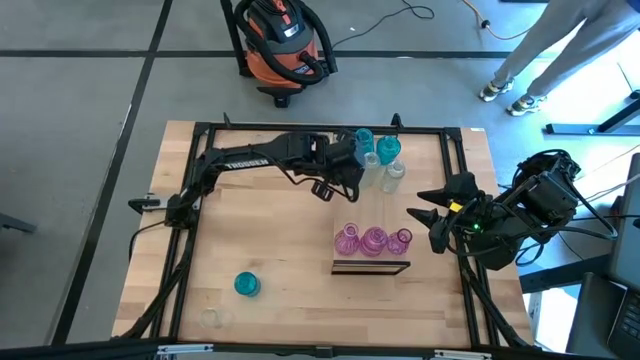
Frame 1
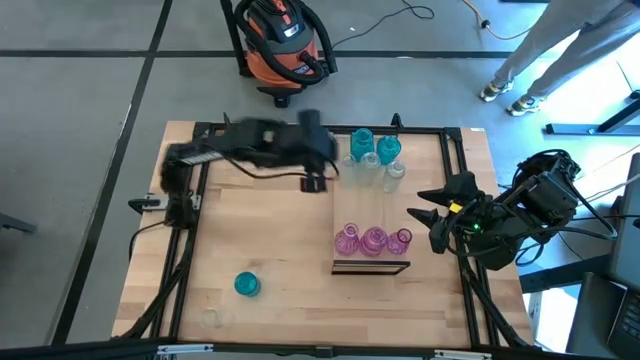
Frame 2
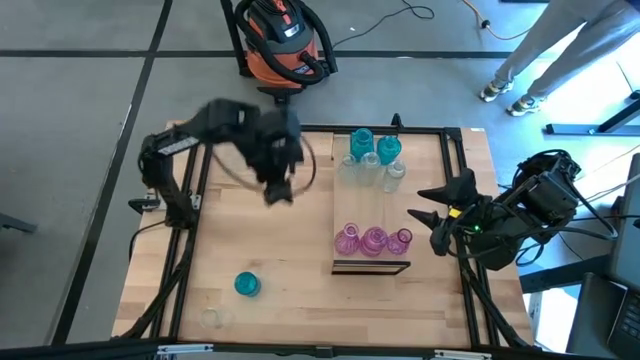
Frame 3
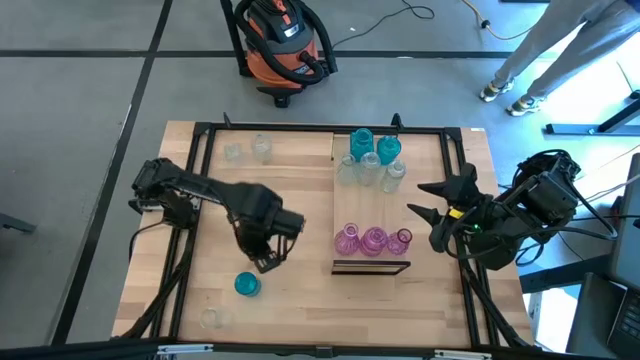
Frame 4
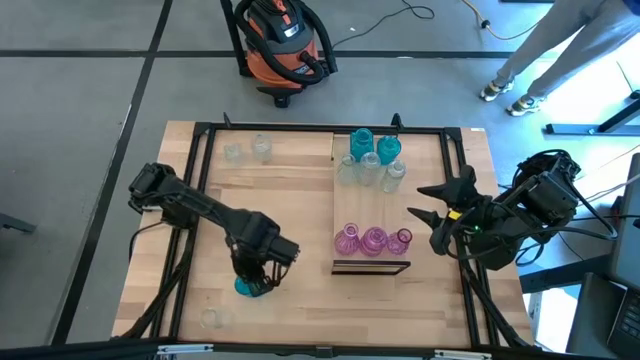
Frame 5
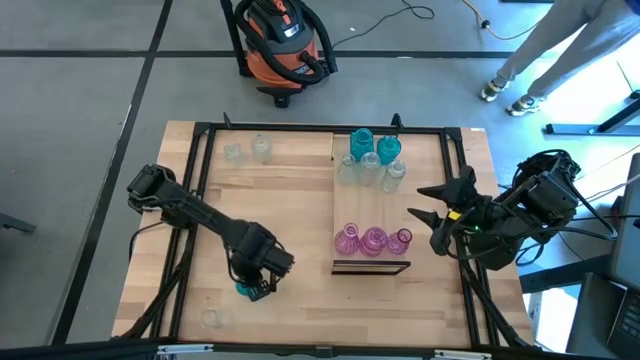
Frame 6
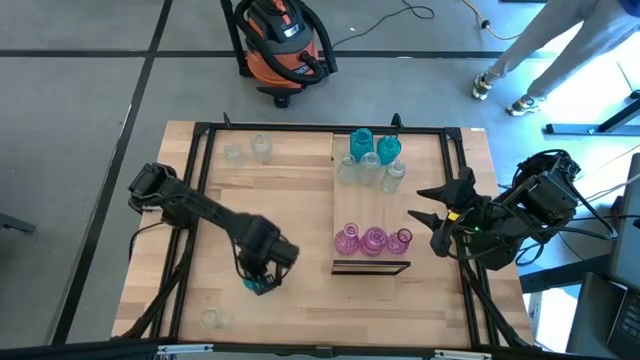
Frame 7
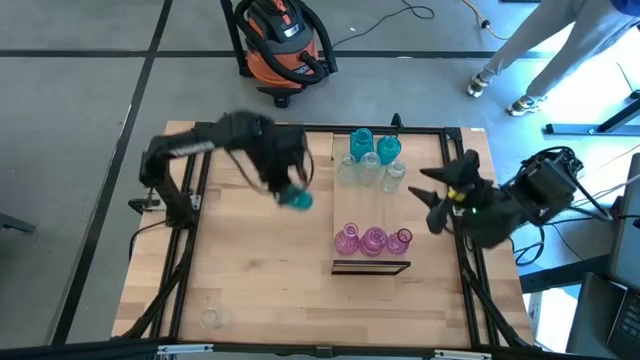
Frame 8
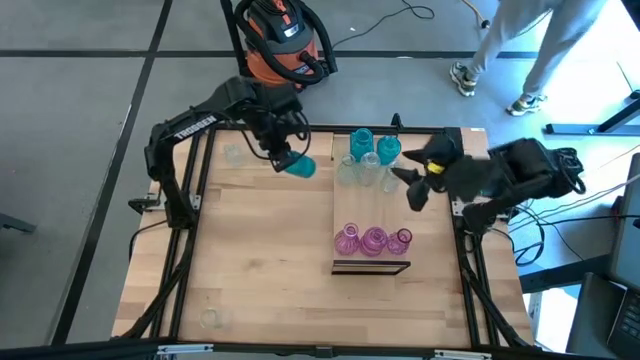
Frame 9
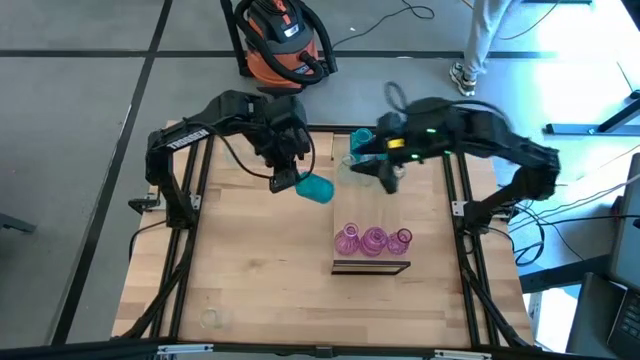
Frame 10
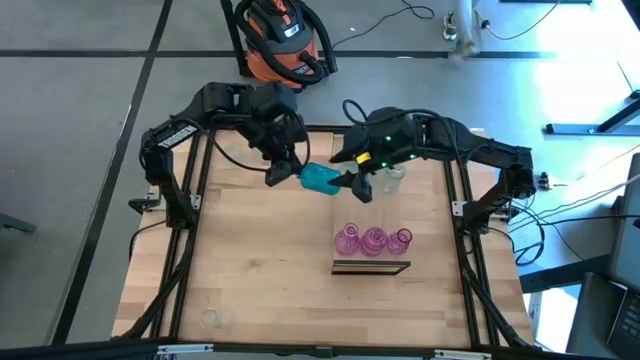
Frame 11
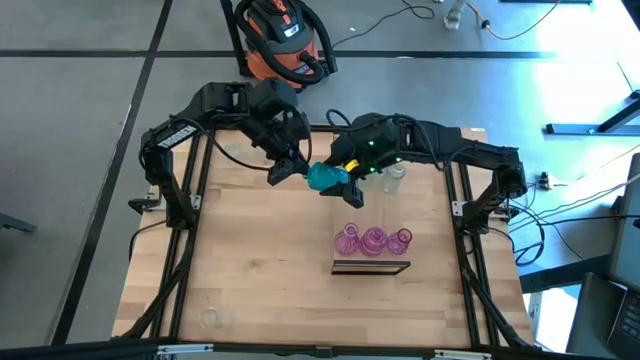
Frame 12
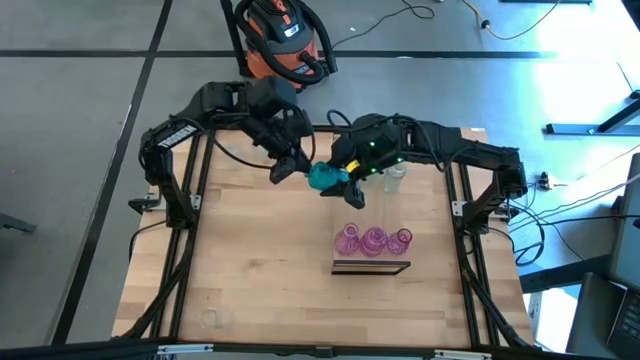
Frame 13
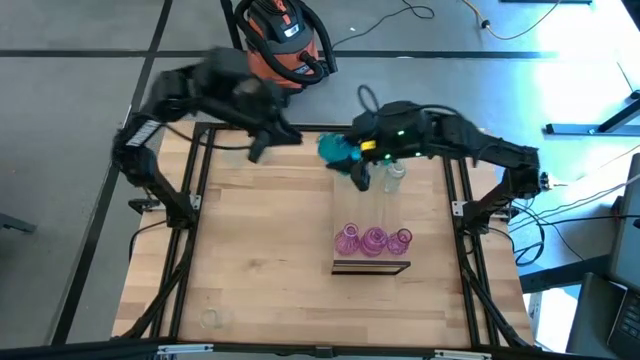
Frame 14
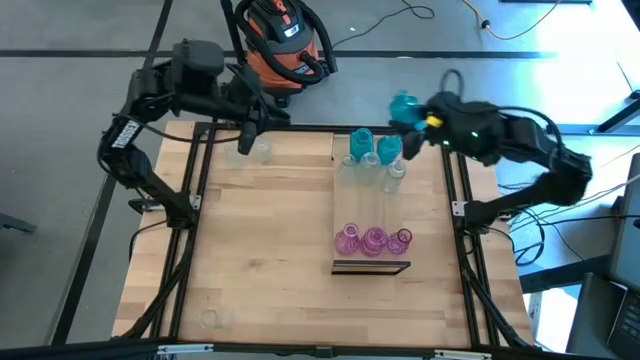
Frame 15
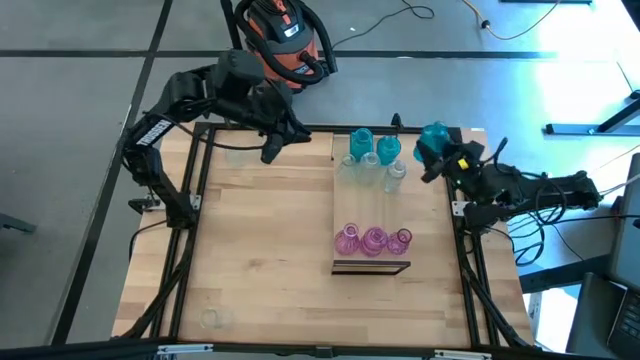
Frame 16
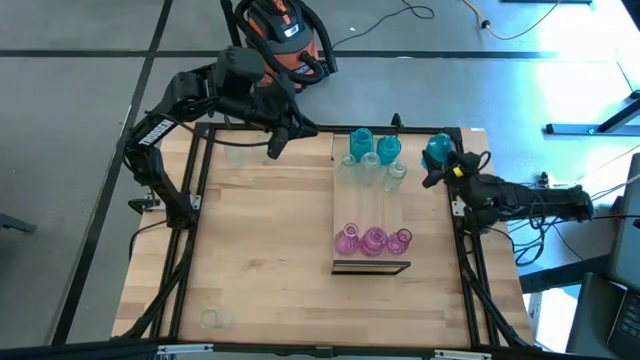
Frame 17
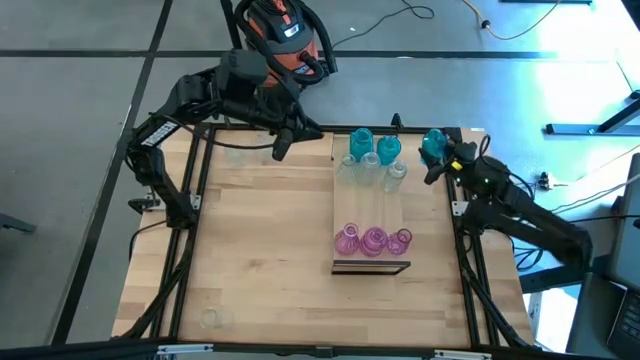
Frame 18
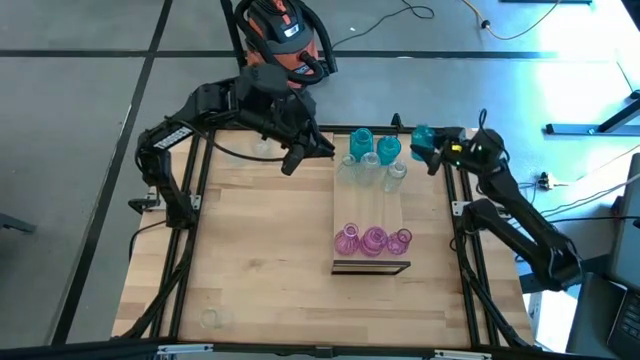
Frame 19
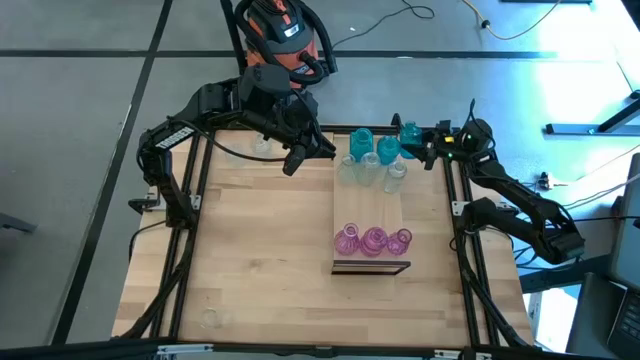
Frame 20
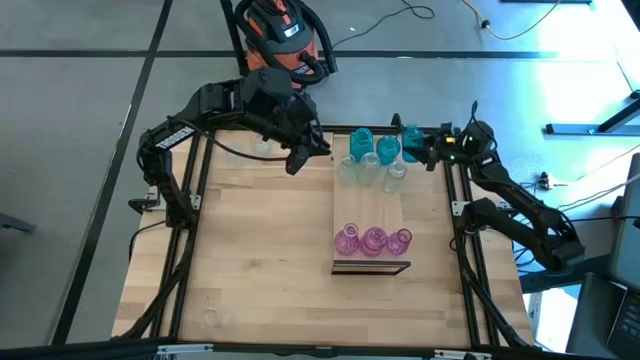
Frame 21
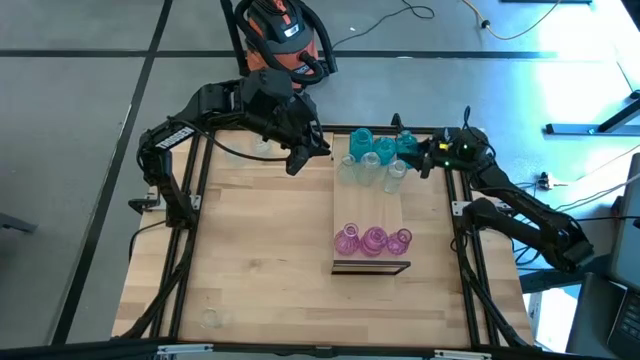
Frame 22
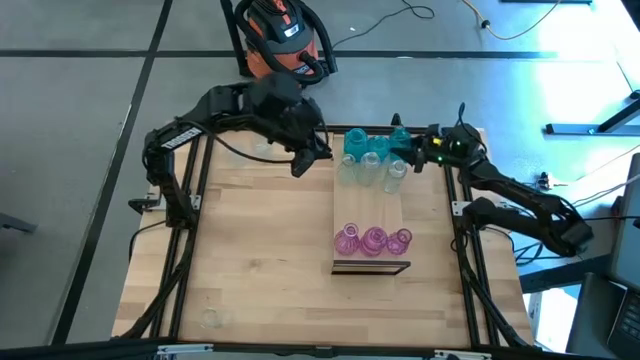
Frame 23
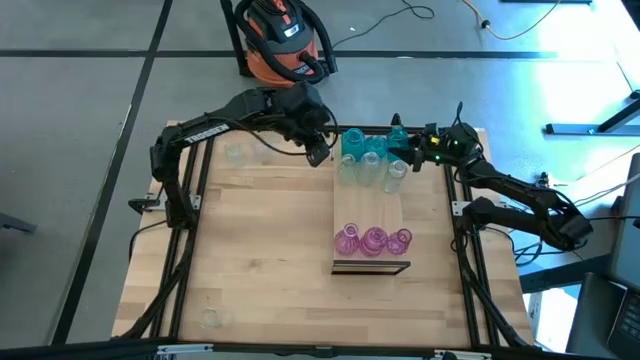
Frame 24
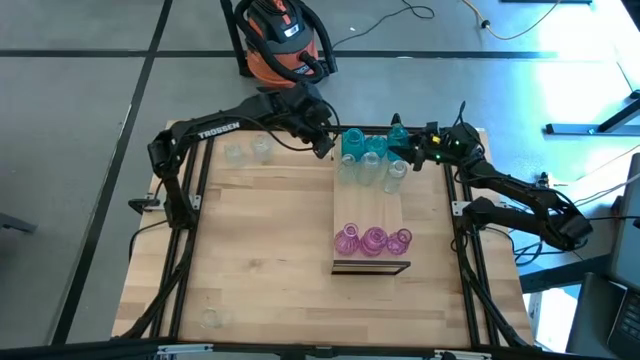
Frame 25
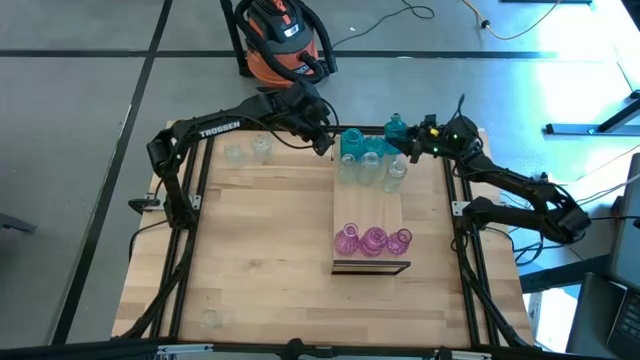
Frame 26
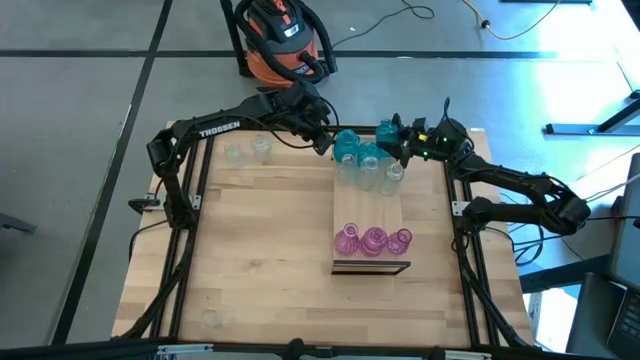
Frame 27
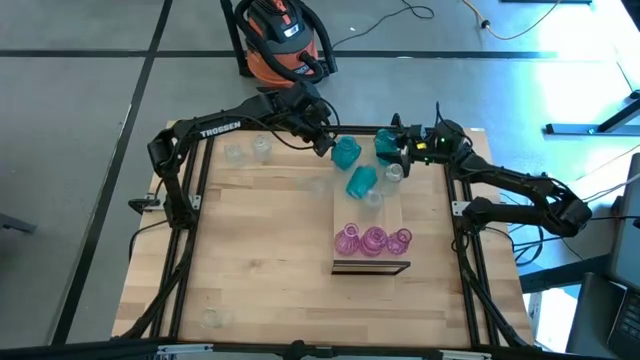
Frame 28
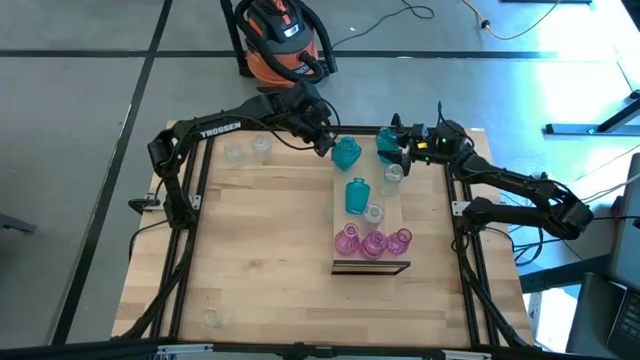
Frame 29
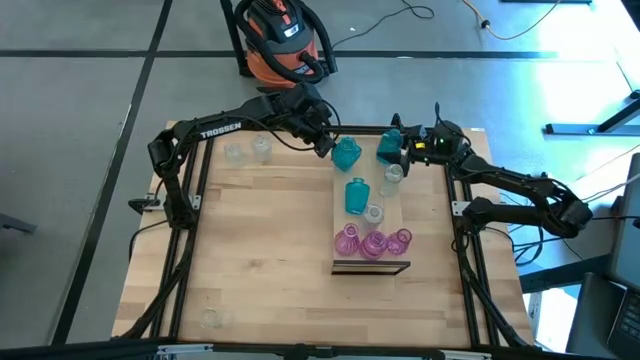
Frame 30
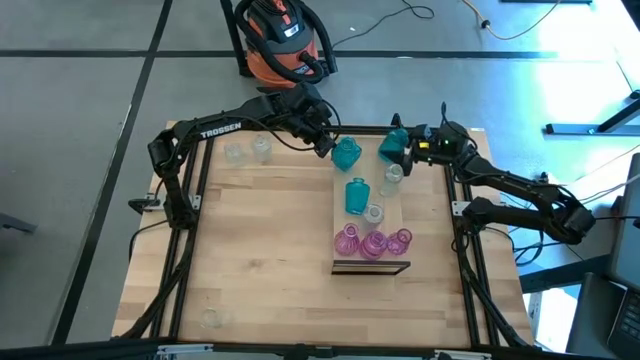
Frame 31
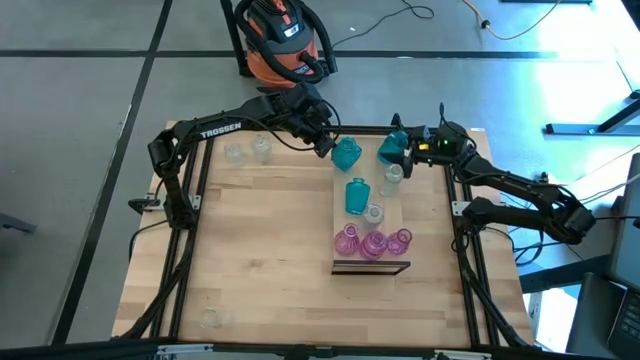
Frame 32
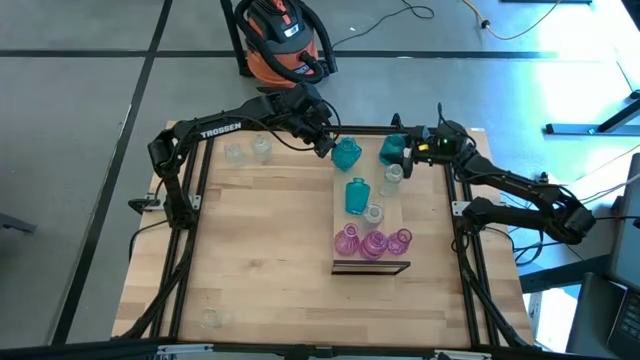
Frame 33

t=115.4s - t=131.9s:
Task: sort vases onto shelf
Put the blue vase on the shelf aligned with the other blue vase

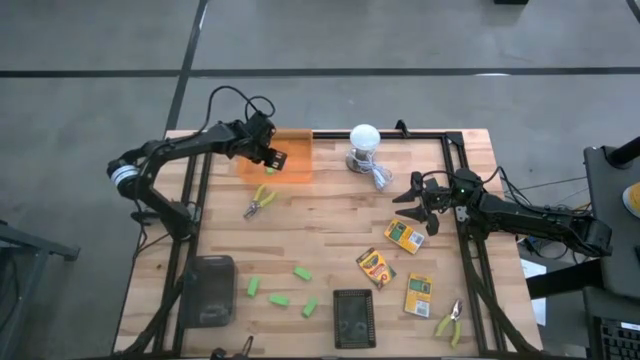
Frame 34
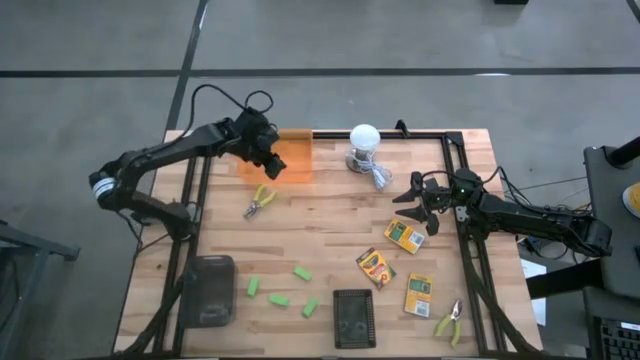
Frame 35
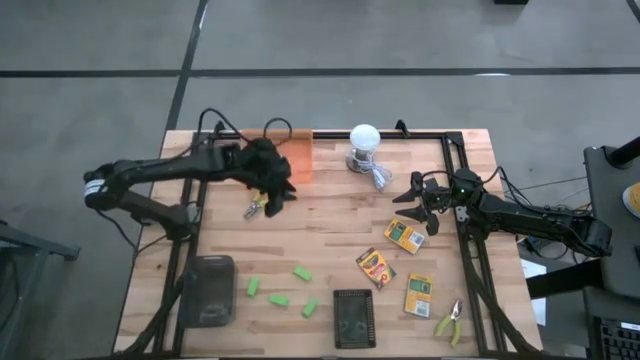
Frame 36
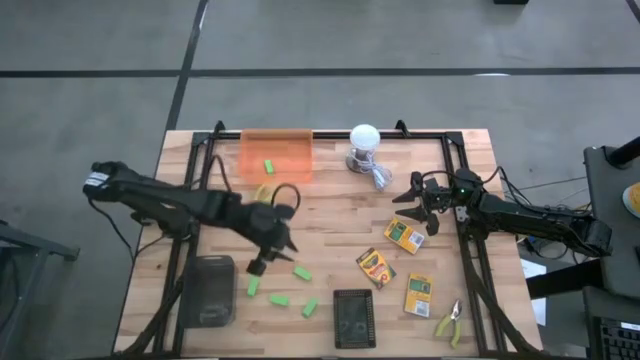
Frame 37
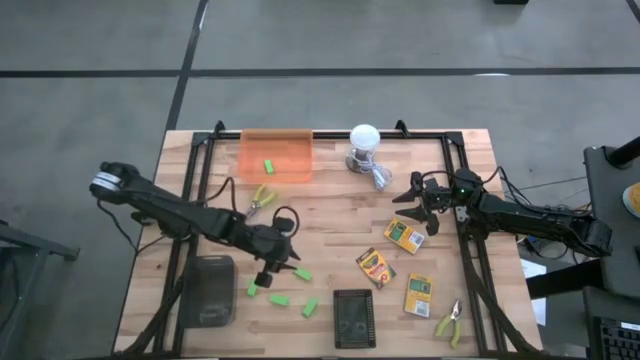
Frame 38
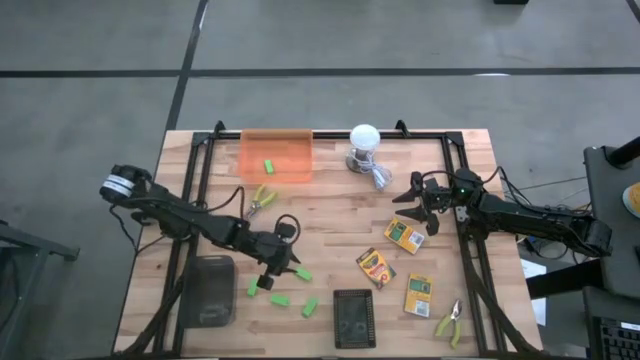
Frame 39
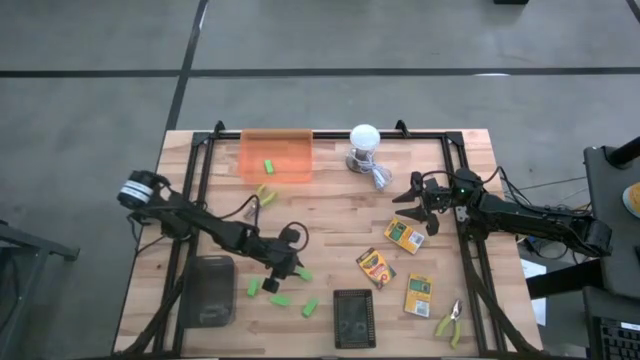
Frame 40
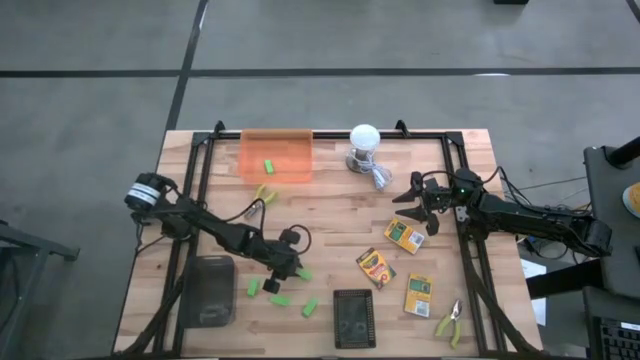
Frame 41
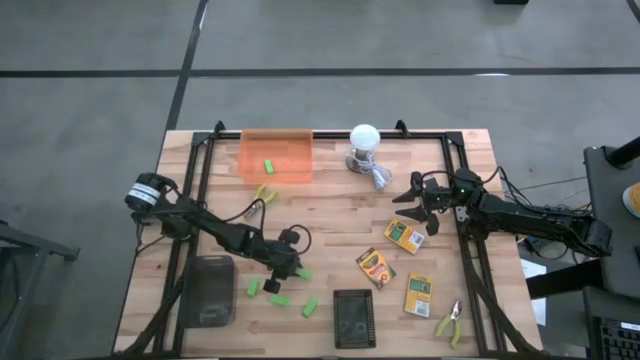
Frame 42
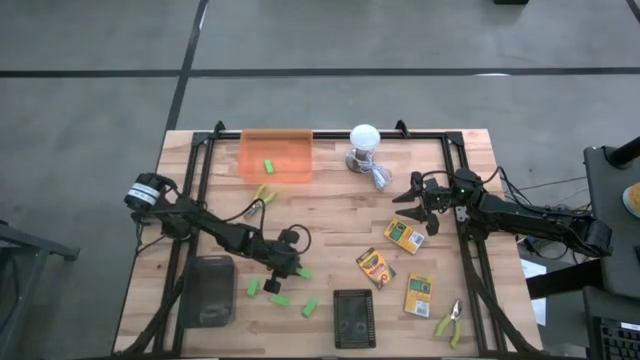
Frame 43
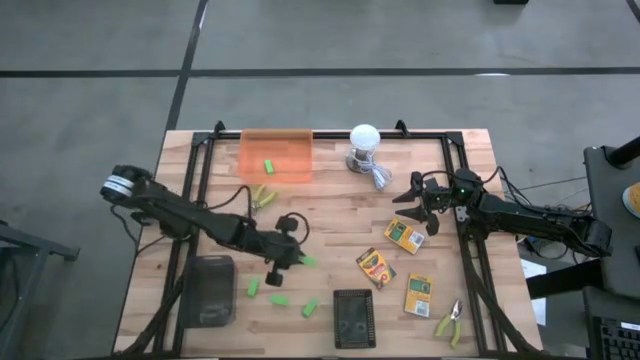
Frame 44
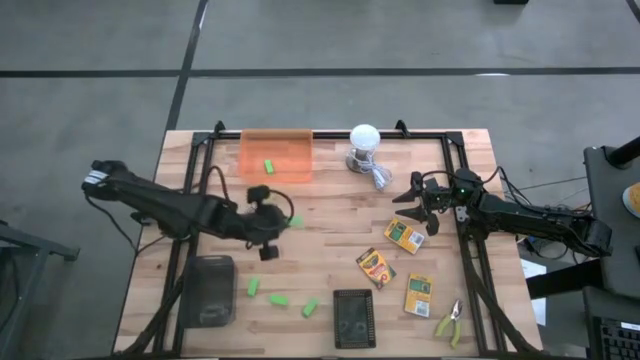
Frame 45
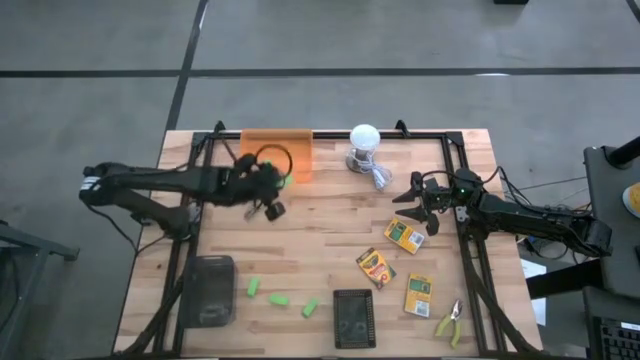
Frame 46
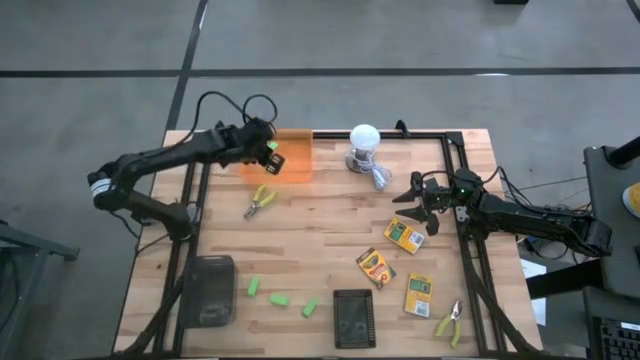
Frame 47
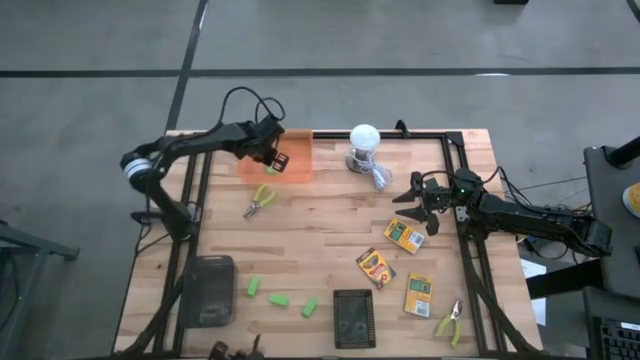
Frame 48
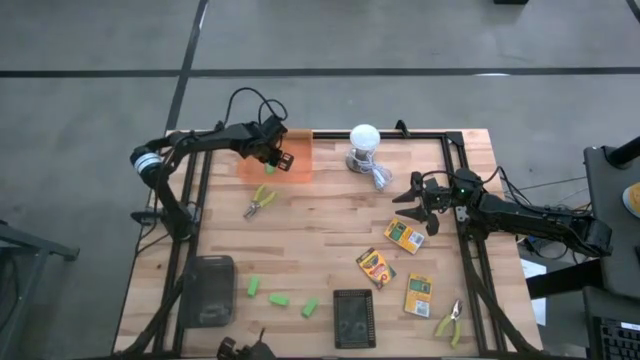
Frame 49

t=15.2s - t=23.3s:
Task: Pick & Place School Supplies
Put the green eraser into the orange bin
